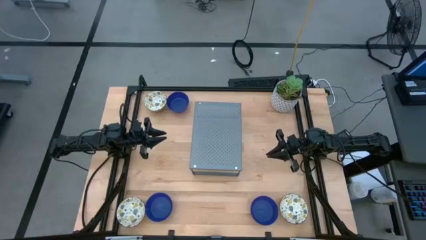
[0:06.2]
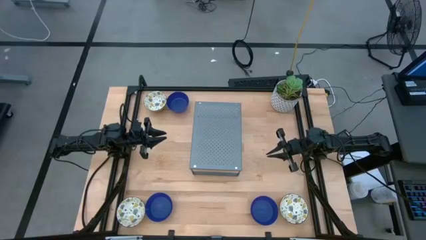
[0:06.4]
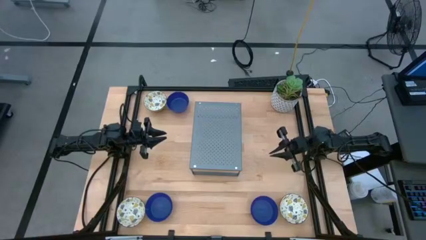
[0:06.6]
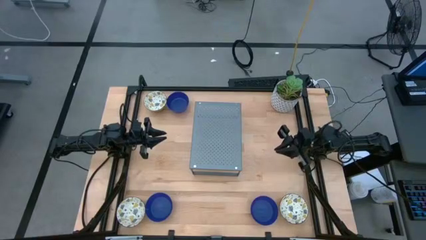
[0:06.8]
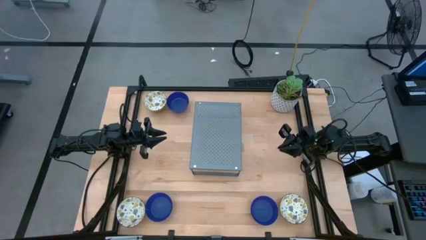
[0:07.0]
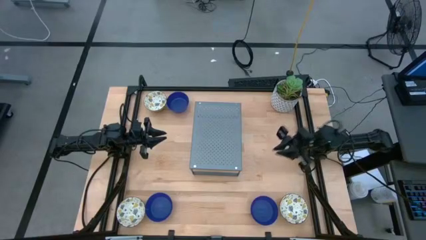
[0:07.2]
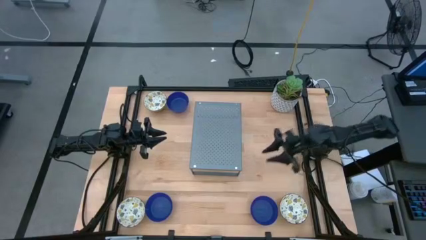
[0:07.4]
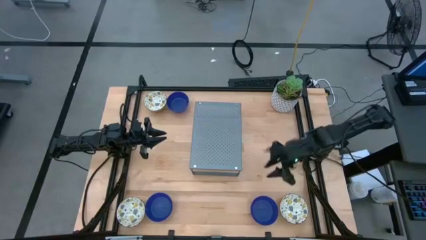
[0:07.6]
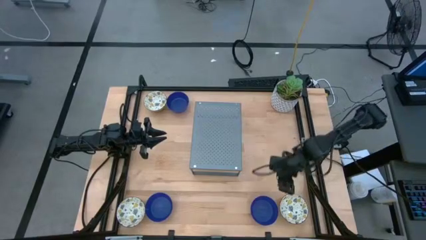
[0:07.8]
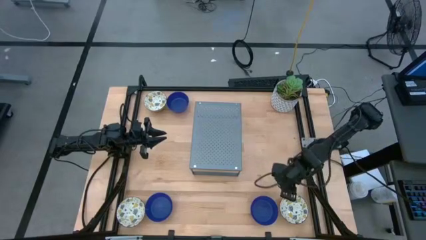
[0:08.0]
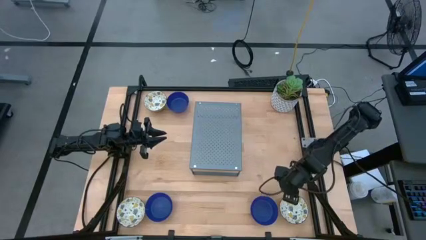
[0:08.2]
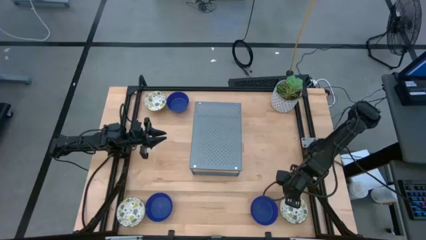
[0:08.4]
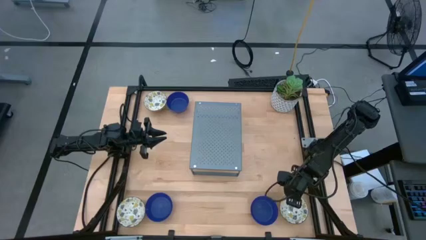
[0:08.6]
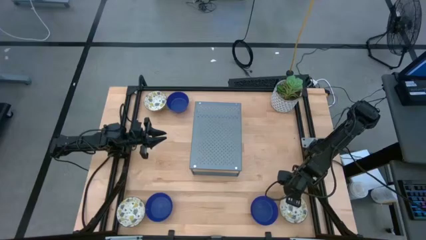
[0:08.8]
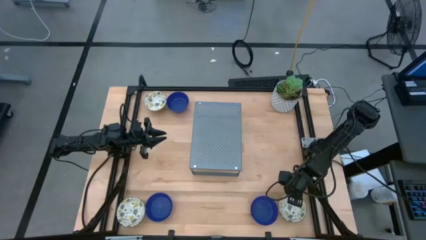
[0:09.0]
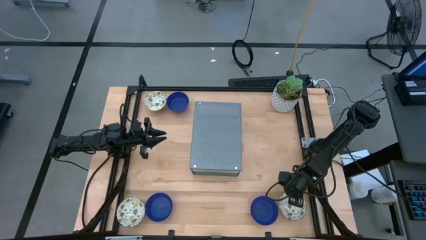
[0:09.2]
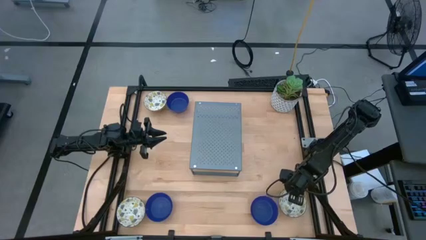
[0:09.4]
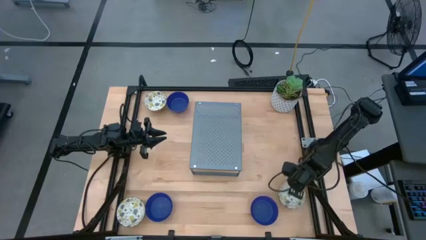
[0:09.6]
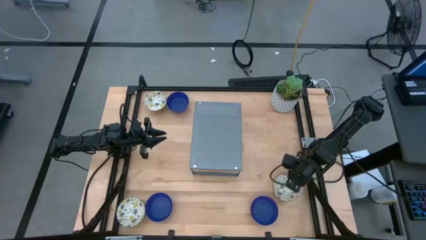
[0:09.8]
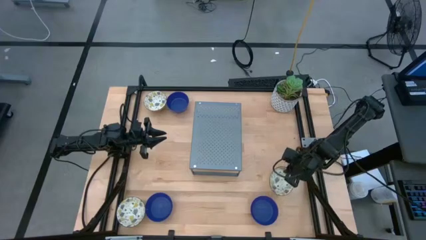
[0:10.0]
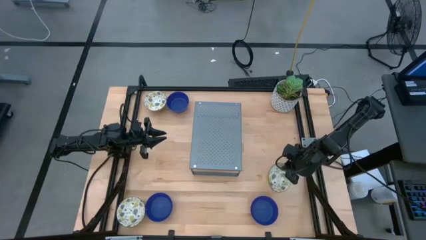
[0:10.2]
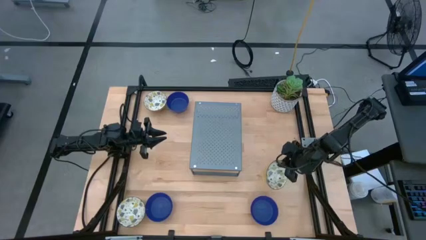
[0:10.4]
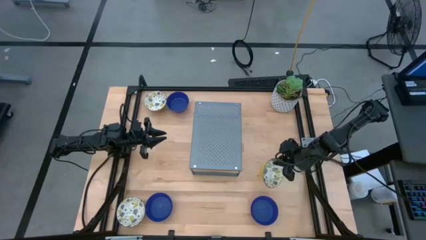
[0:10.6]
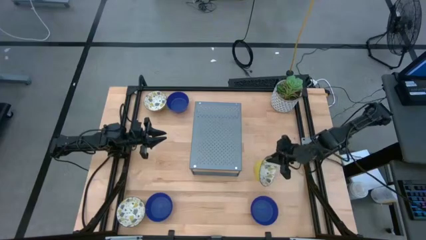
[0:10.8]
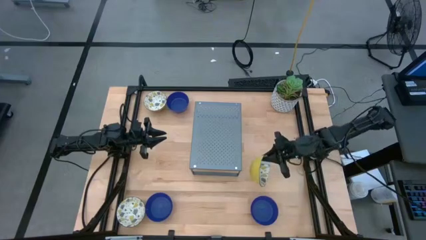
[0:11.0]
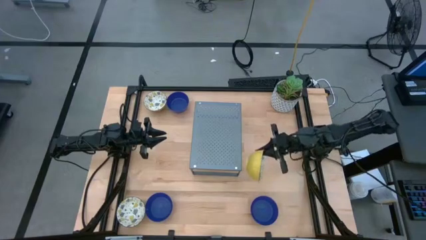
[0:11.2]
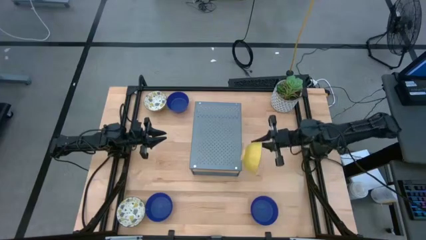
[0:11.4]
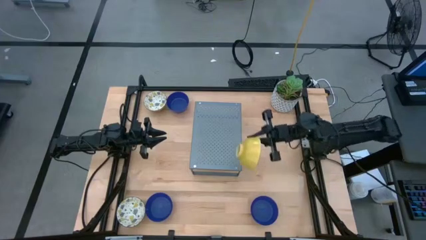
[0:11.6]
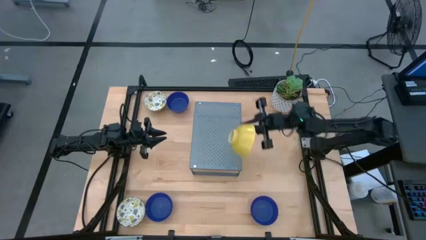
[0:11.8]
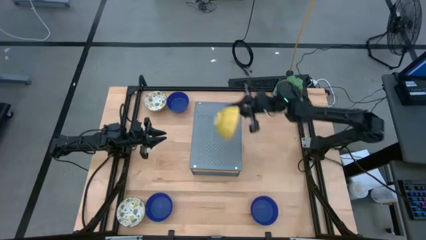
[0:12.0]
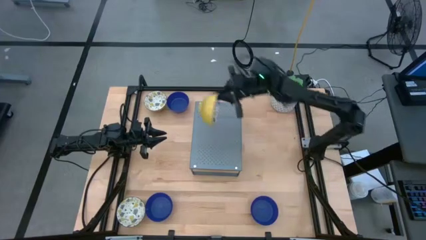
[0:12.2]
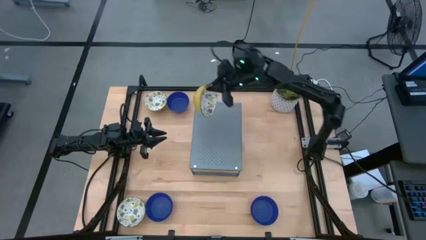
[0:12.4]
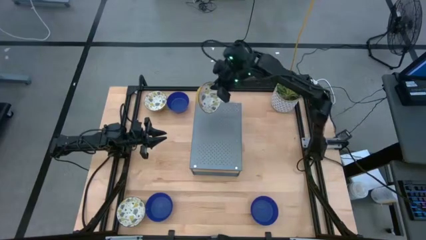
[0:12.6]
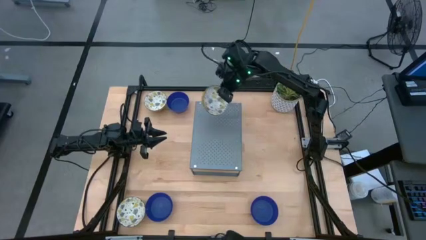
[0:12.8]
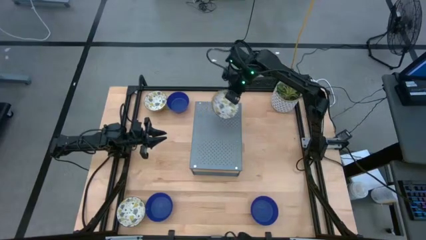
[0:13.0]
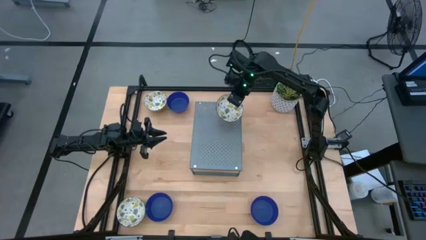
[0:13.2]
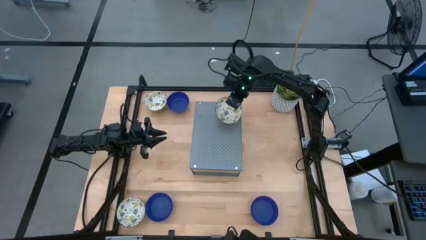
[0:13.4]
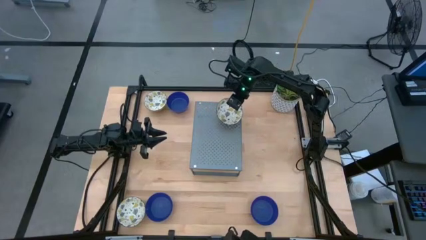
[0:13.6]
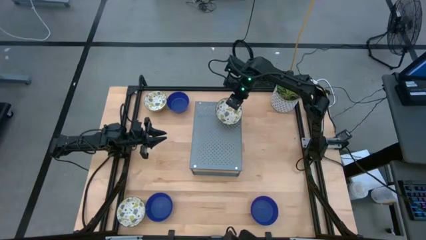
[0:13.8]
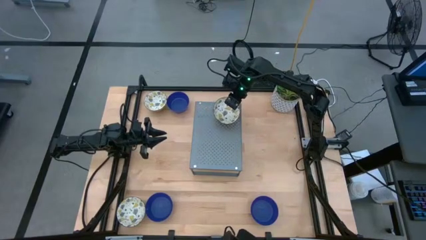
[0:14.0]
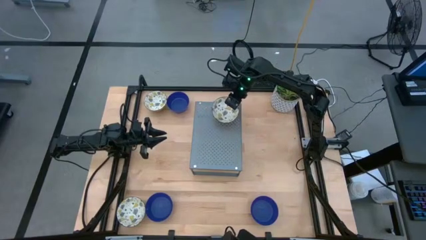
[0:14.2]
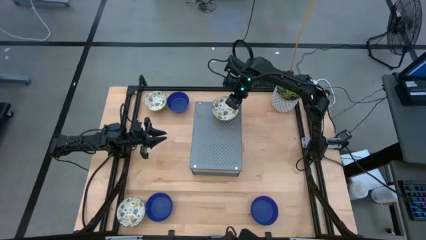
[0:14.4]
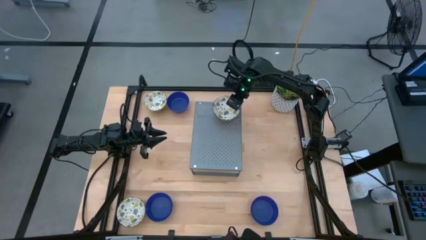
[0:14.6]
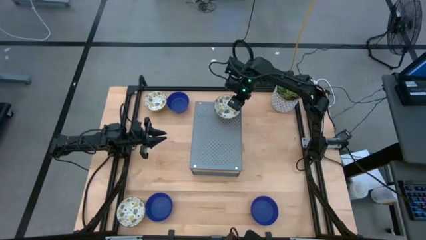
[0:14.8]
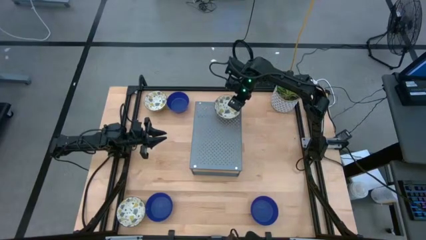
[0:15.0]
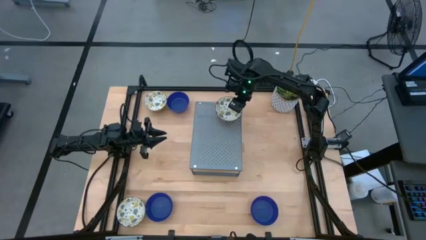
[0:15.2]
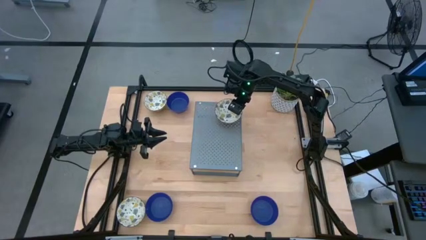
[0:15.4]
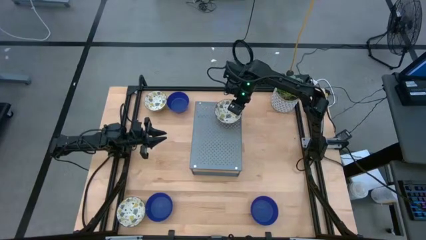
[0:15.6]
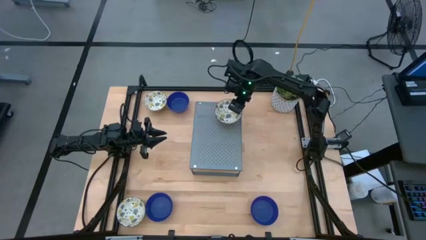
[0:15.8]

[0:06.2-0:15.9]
Task: Pick & Place Mini bowls
Put the bottom right yellow patterned bowl on the shelf

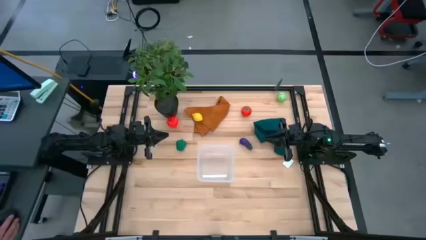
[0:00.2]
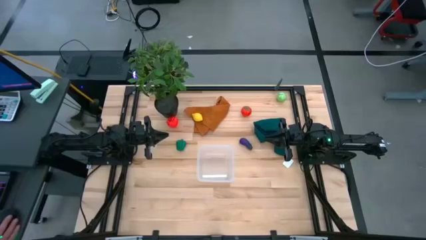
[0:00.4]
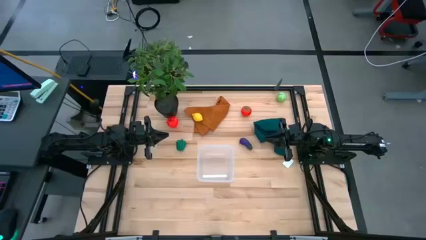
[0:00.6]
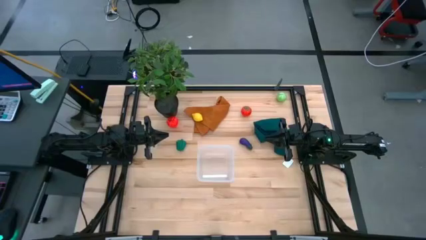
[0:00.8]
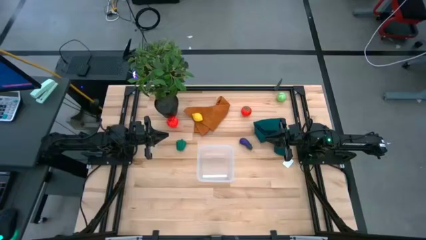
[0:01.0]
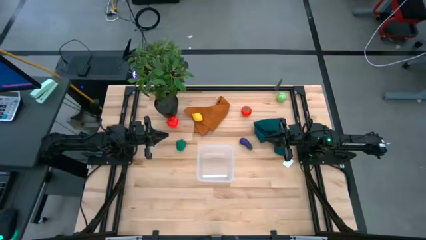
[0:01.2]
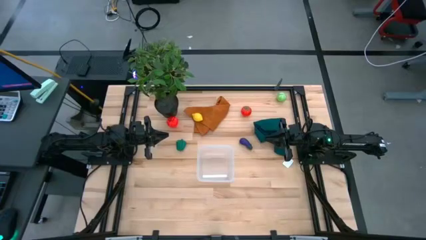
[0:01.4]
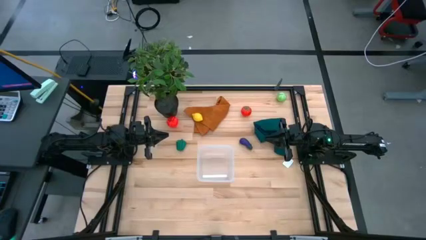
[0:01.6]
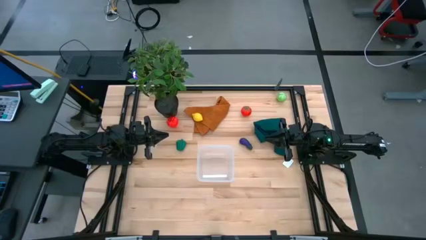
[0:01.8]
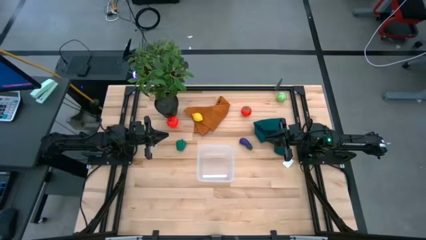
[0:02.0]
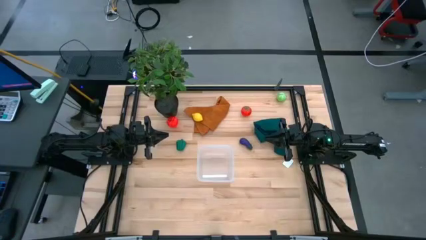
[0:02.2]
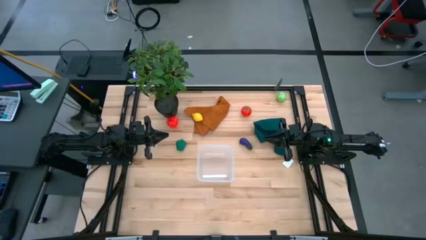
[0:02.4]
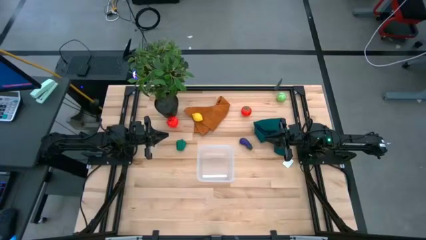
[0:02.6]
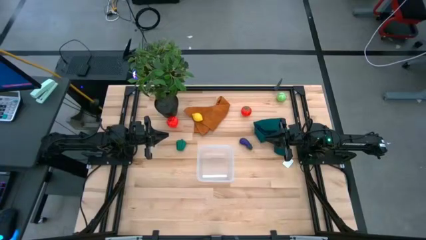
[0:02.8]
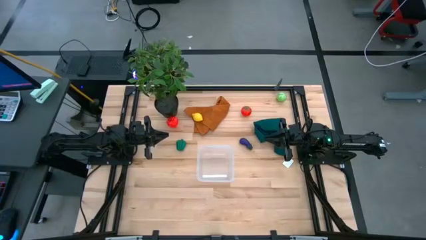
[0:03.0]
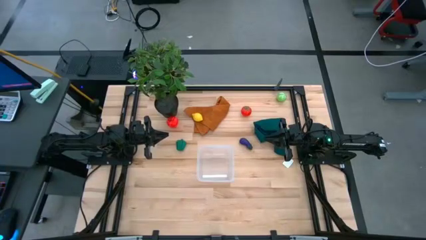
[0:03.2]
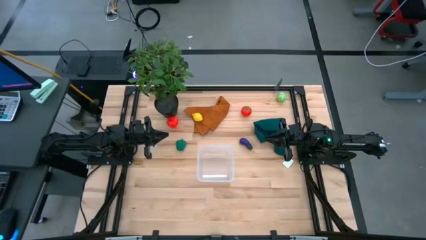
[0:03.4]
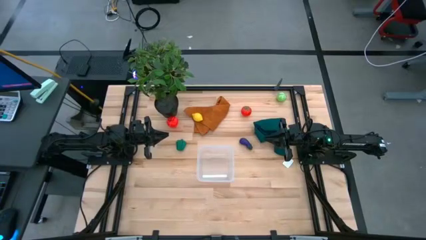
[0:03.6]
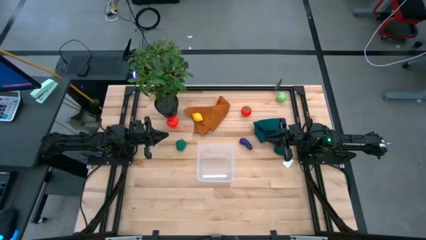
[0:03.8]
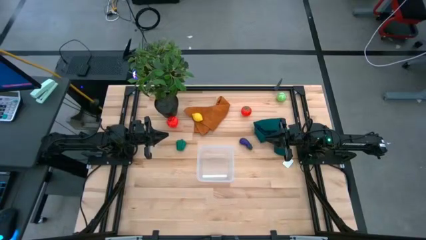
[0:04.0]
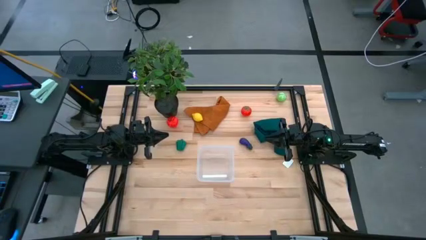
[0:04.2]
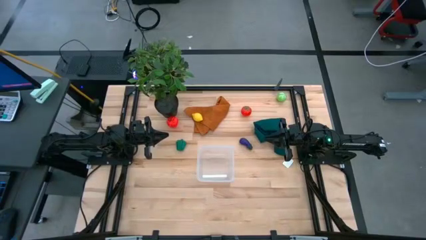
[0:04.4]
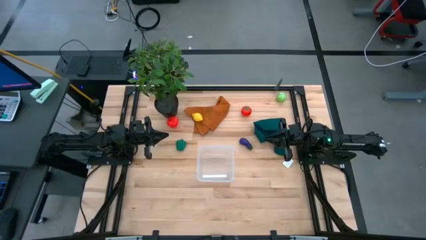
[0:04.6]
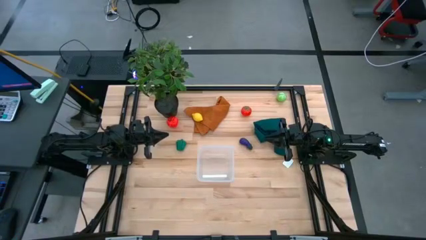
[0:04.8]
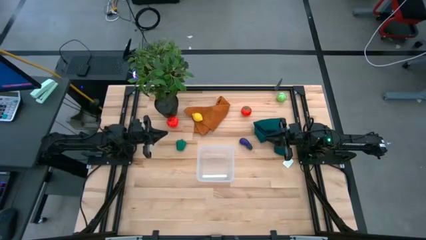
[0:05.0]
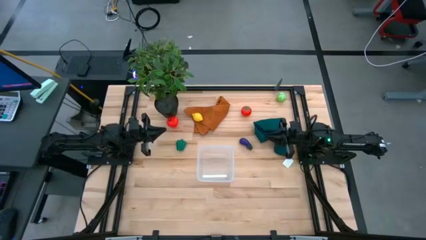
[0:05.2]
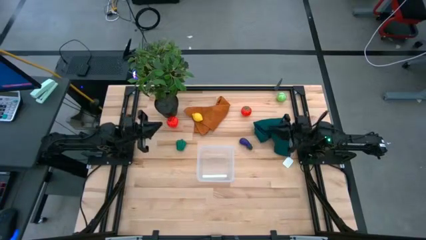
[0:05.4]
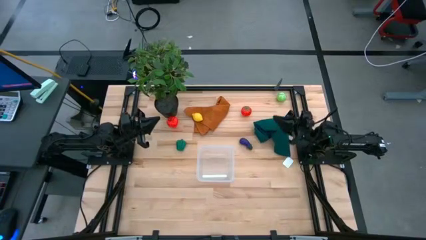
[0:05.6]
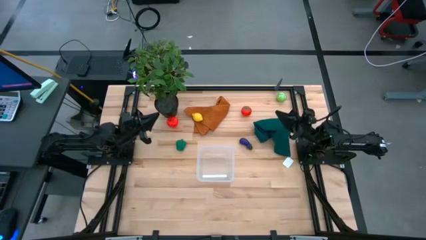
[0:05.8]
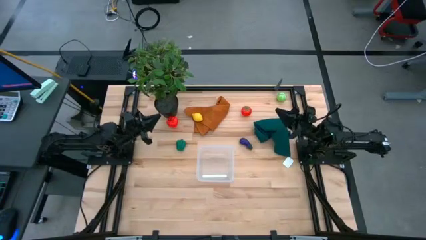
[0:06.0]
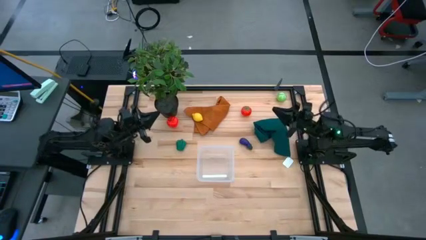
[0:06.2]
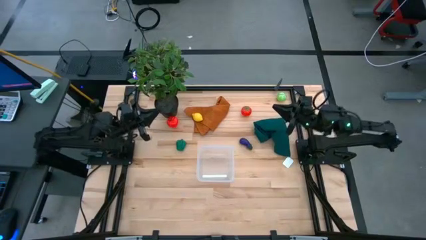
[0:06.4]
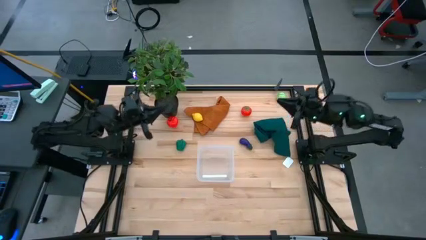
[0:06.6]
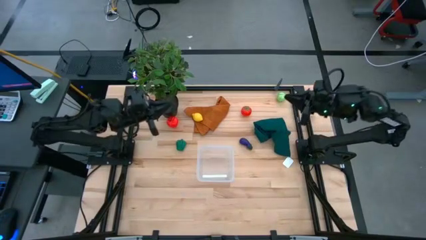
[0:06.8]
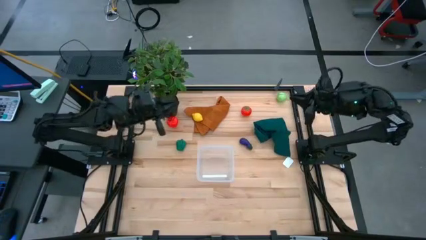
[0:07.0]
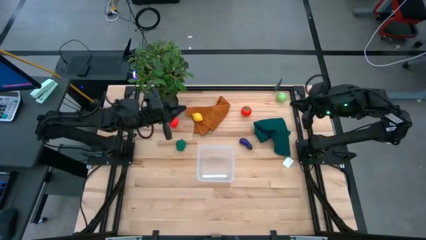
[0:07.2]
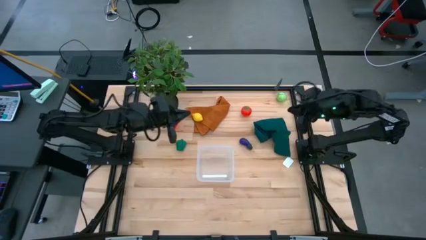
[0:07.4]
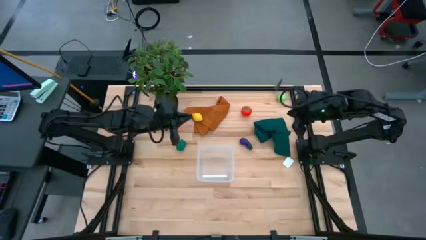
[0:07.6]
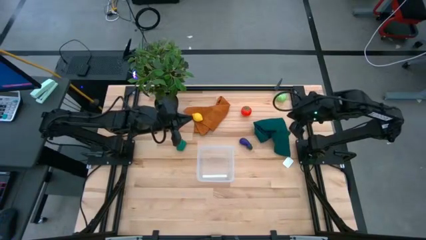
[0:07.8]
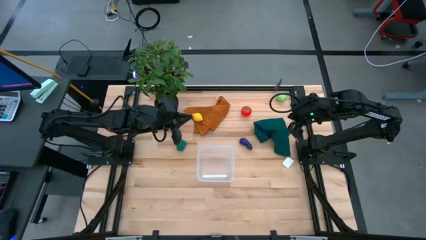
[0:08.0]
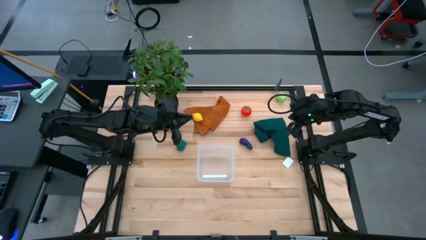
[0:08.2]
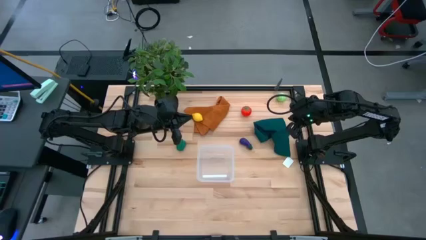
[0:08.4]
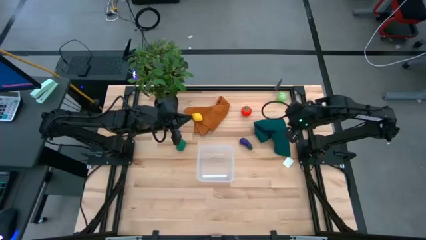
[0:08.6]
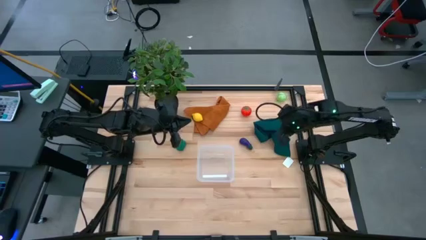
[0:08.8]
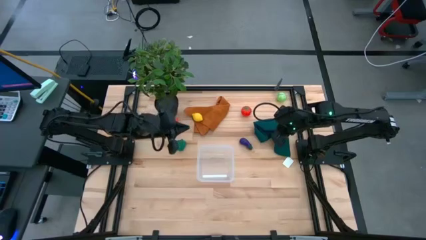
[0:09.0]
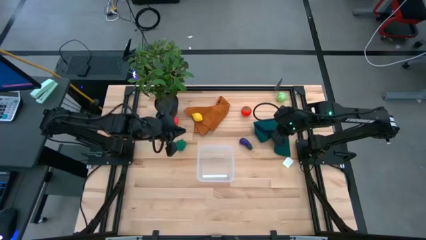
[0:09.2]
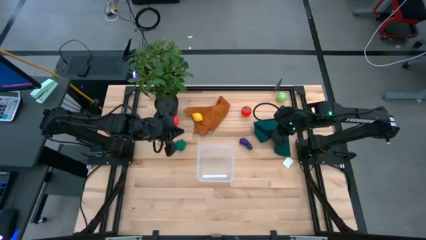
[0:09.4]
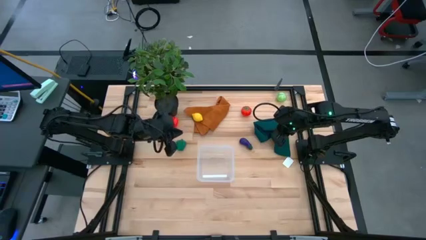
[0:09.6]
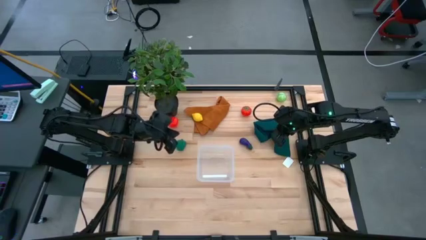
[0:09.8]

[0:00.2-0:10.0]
Task: Pick and placing Produce into tupperware
Put the green bell pepper into the transparent bin
